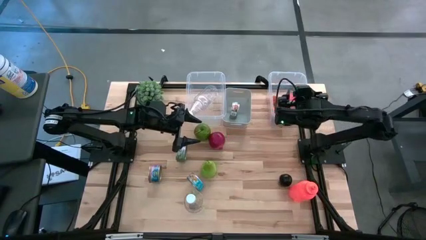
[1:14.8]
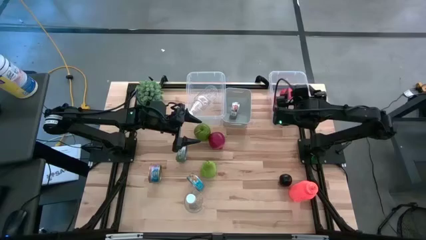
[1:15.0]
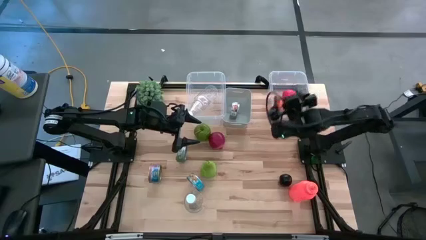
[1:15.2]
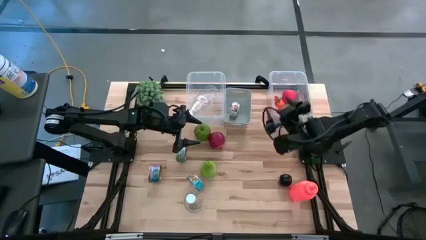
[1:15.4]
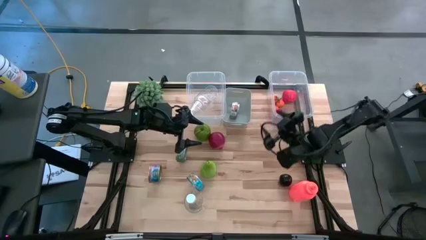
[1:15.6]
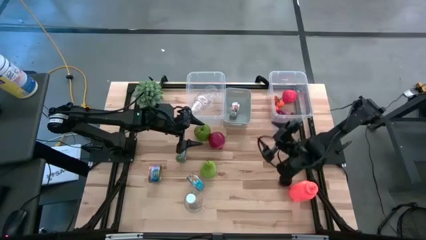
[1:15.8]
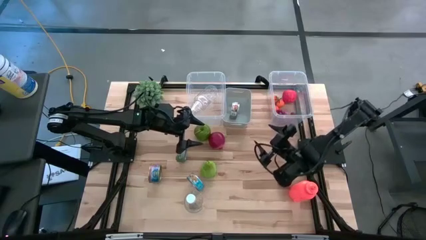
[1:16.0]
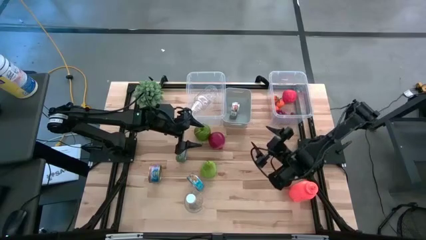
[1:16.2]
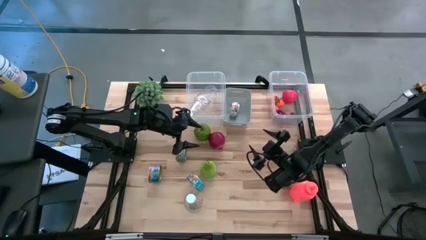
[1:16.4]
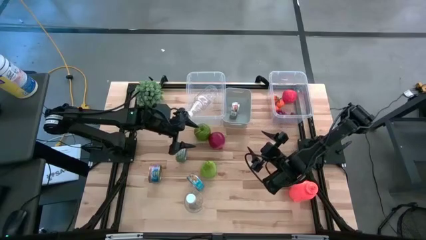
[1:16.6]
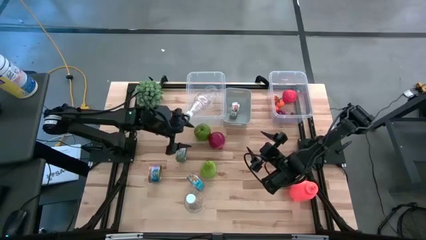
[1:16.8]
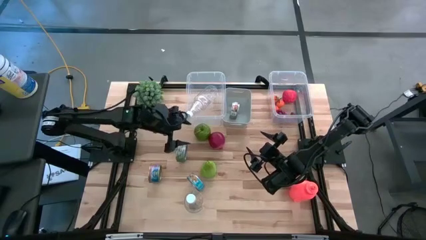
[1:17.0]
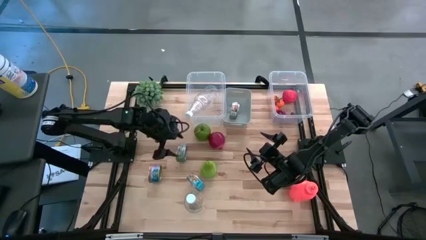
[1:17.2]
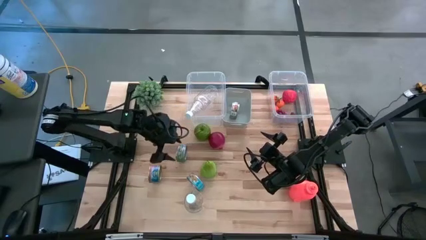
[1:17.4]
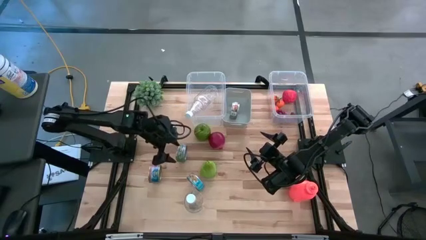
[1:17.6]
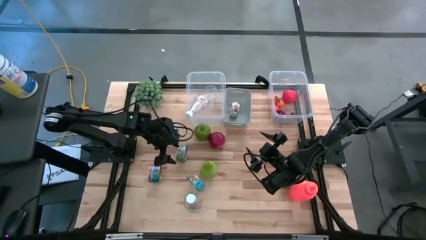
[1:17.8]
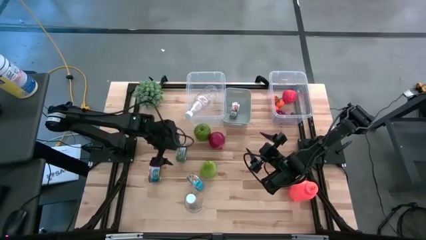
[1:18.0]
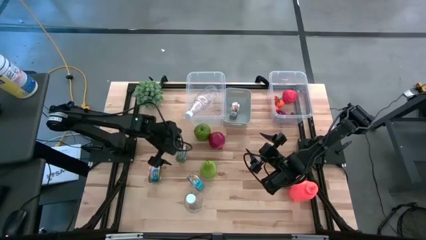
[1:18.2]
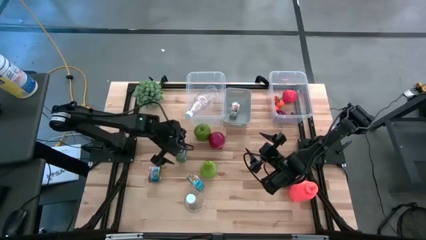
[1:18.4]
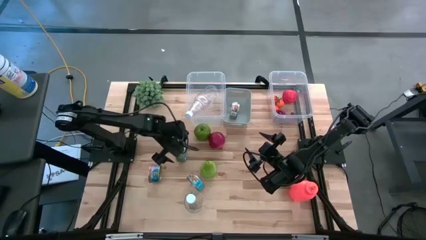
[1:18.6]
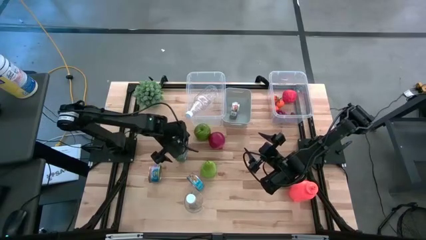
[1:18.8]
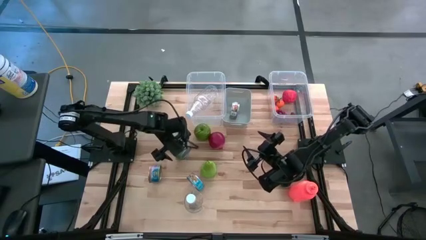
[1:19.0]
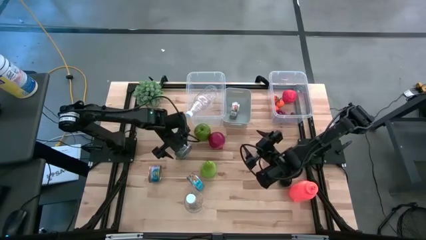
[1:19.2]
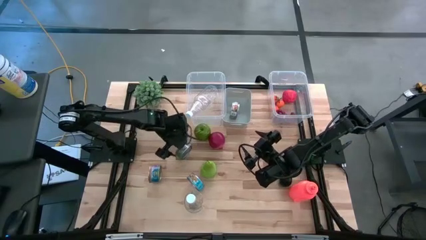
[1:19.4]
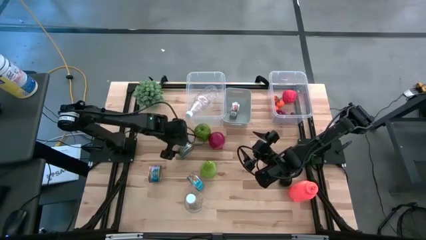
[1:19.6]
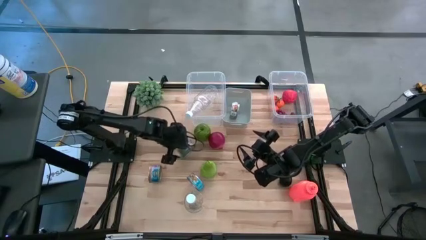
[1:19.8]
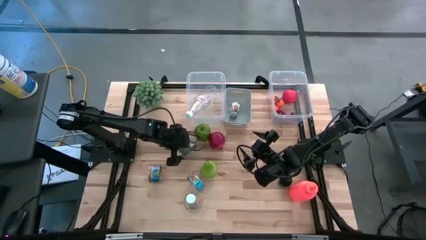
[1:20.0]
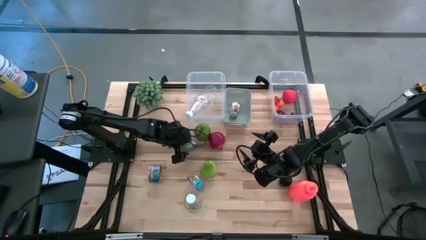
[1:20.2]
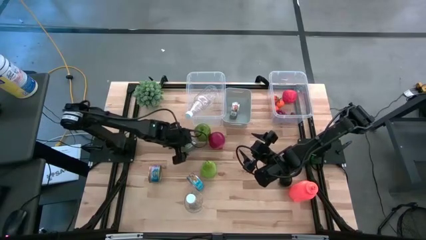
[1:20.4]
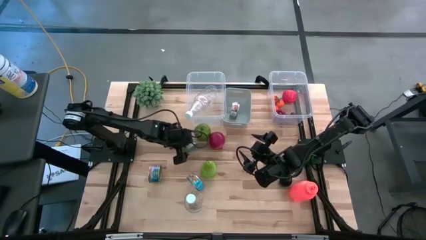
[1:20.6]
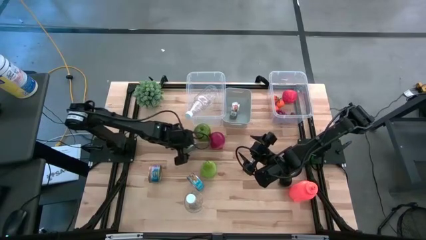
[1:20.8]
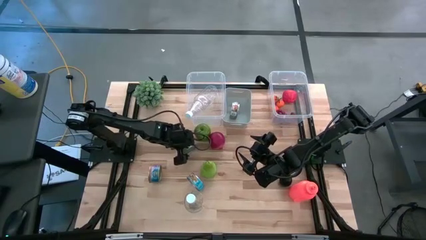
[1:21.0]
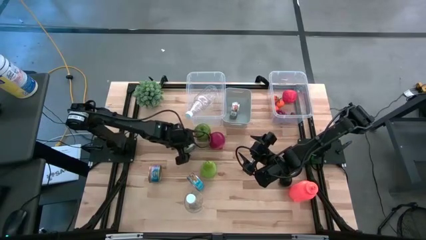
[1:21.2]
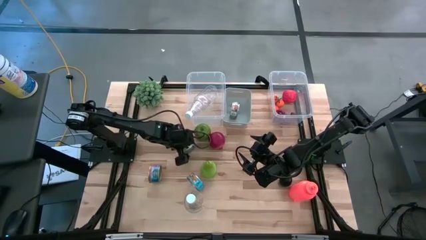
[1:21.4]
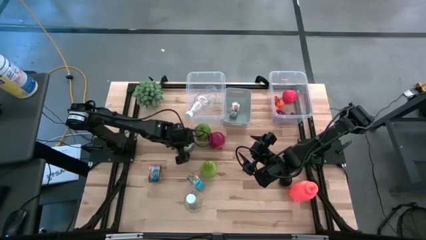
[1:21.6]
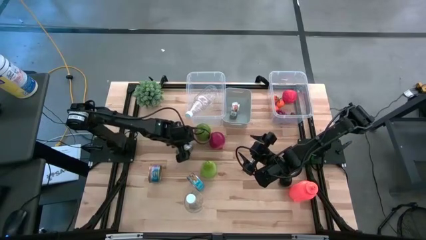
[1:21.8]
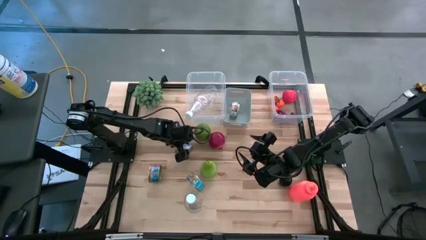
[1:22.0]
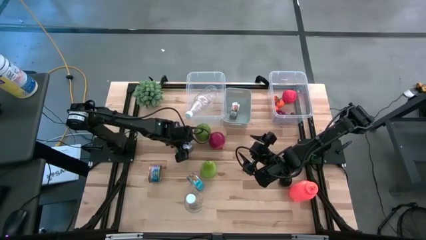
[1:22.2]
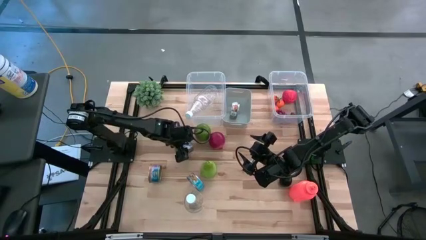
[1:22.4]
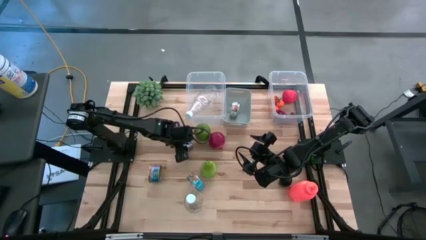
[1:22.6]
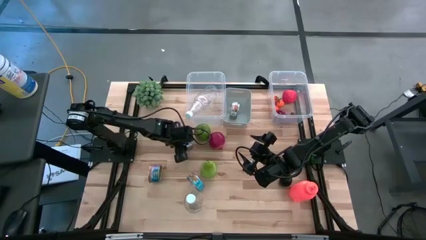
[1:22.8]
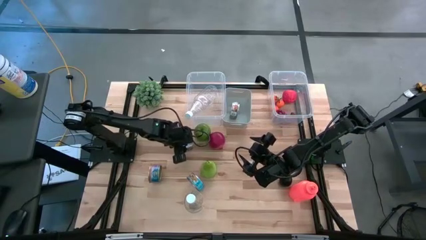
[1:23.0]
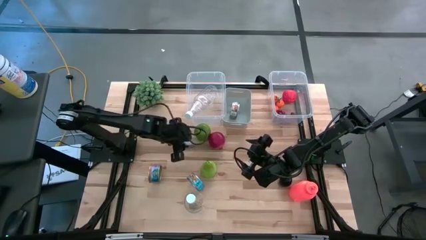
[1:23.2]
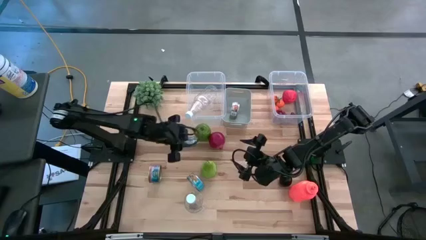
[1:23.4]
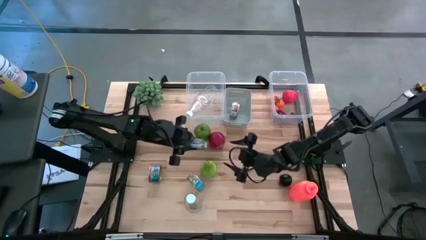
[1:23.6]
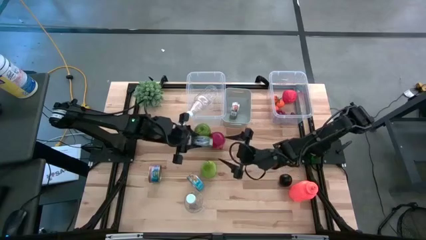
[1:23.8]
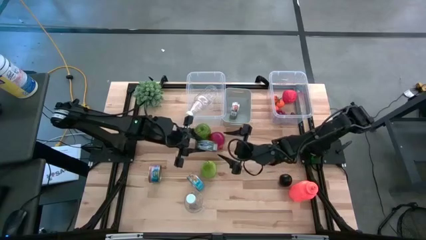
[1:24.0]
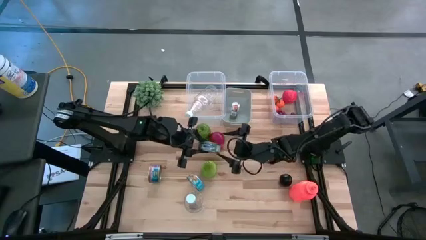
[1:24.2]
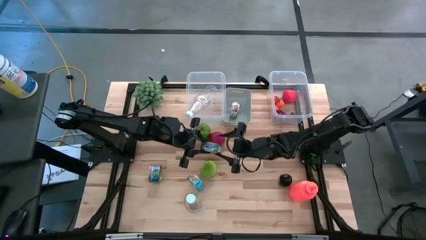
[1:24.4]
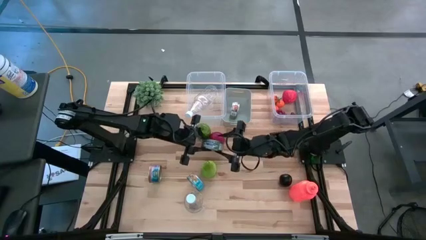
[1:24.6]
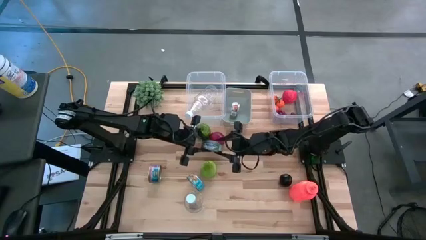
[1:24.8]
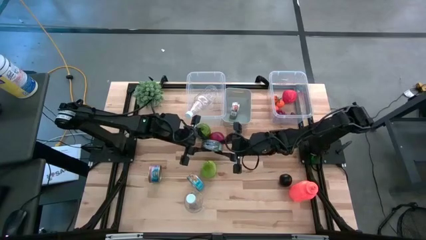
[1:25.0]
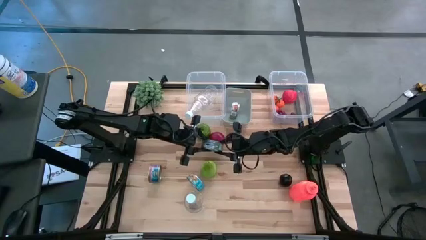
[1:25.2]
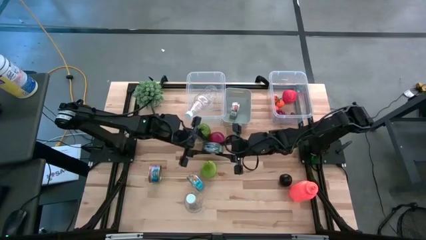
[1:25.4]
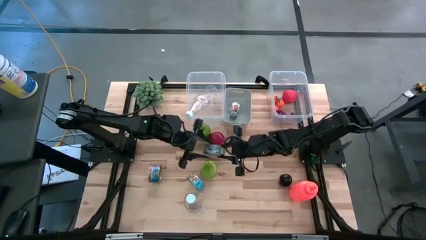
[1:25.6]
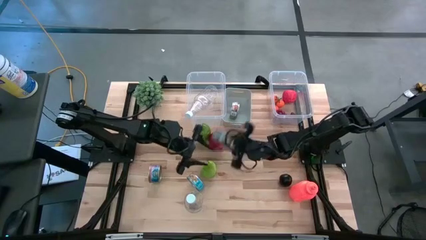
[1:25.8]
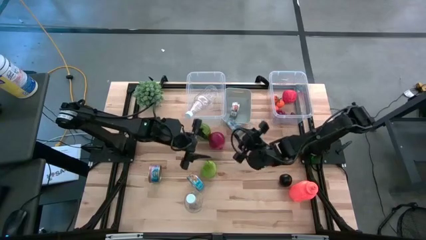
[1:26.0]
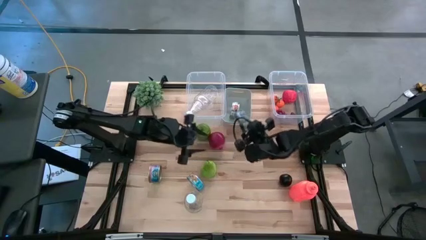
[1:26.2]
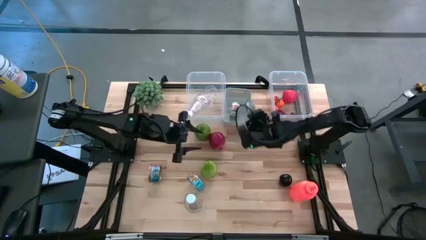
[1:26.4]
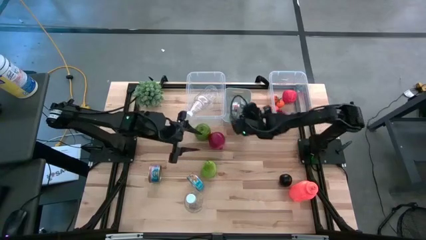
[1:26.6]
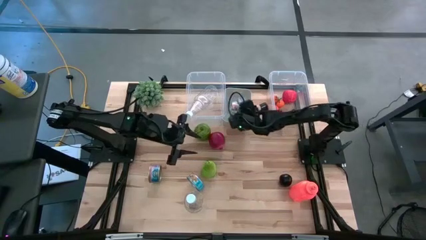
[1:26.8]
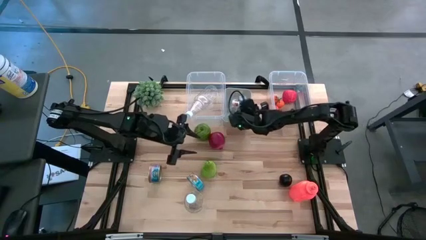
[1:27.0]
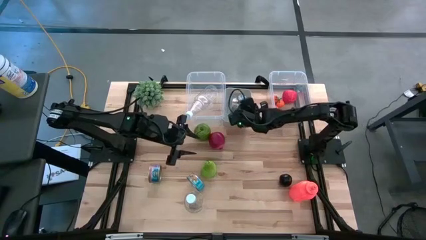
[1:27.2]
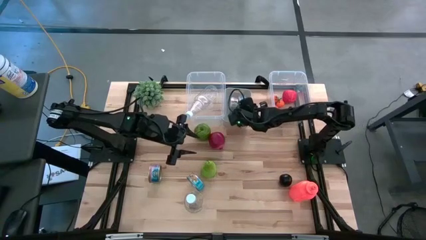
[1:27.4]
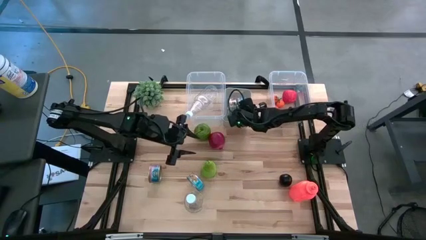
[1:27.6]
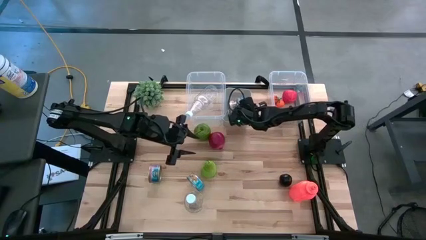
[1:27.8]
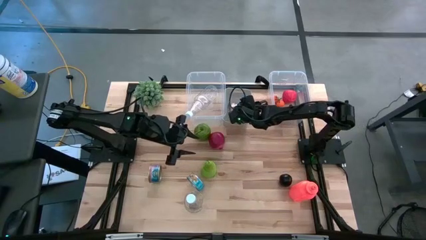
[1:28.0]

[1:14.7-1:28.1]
Task: Pick & Place Food Item
Put the green tuna can into the gray bin
